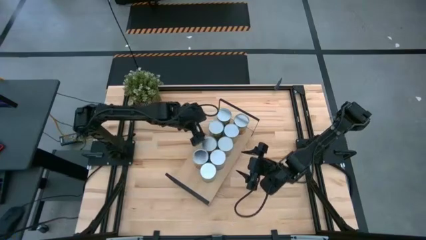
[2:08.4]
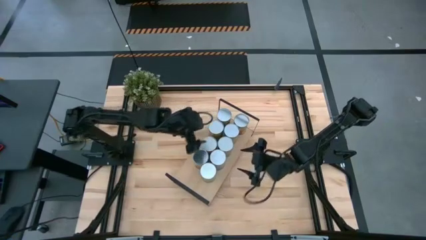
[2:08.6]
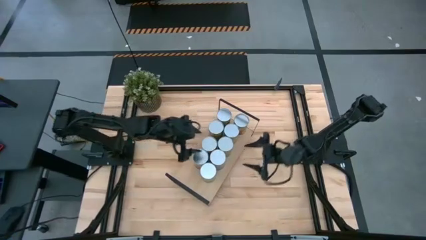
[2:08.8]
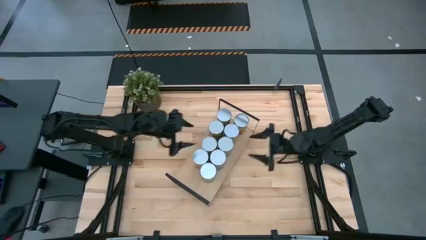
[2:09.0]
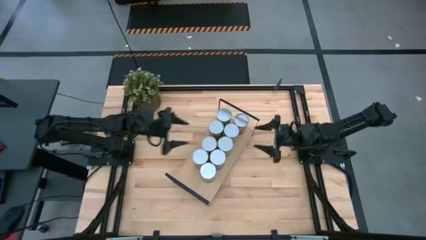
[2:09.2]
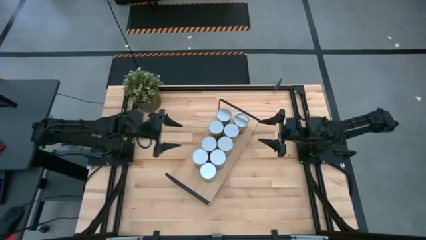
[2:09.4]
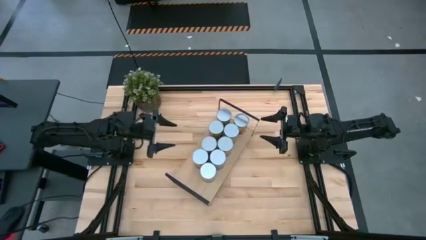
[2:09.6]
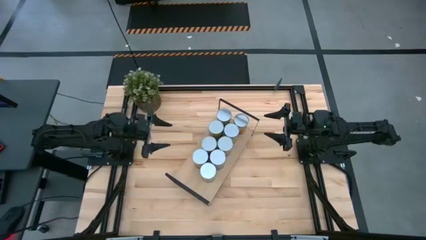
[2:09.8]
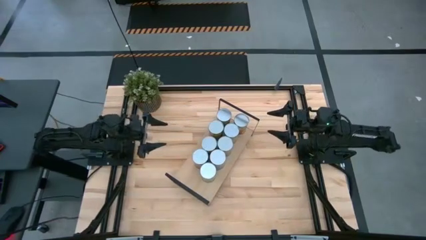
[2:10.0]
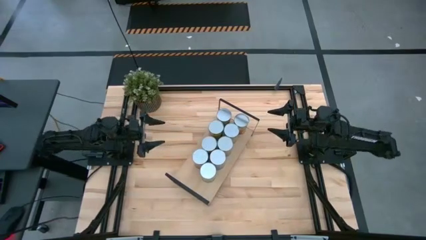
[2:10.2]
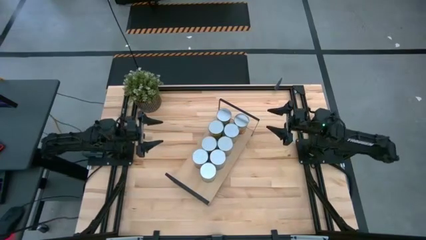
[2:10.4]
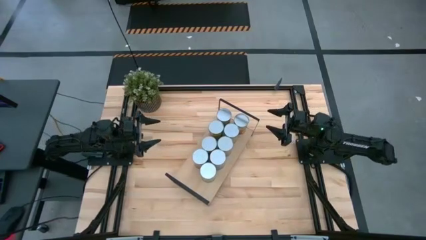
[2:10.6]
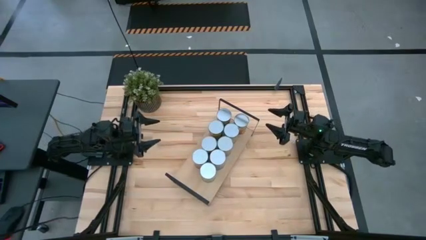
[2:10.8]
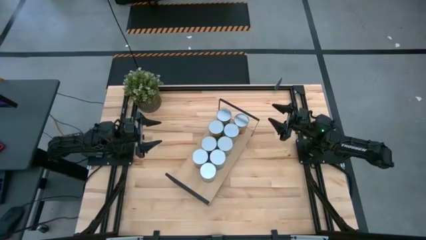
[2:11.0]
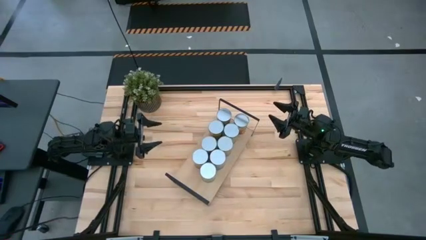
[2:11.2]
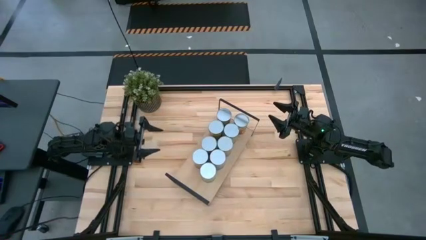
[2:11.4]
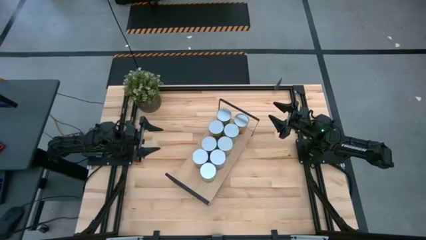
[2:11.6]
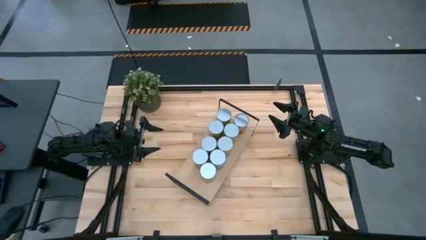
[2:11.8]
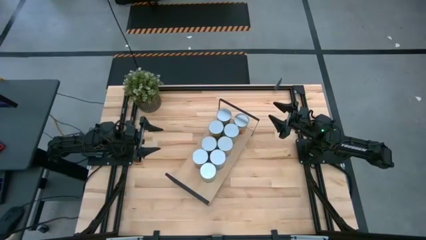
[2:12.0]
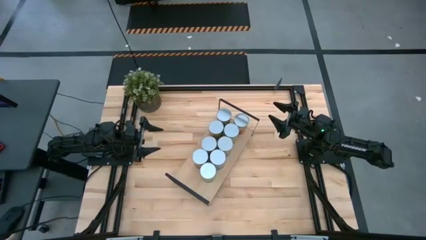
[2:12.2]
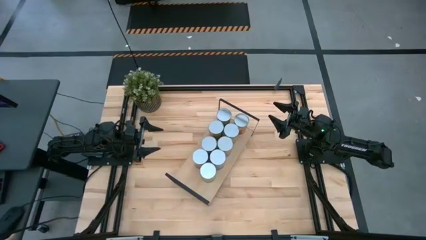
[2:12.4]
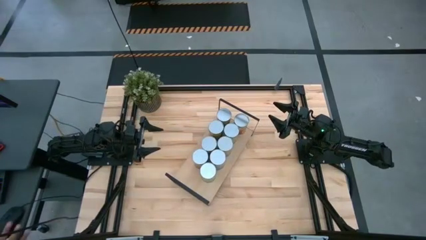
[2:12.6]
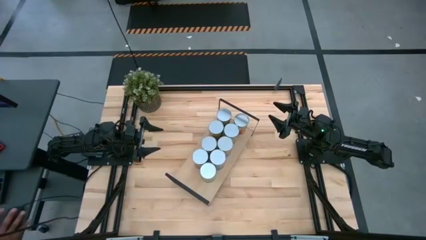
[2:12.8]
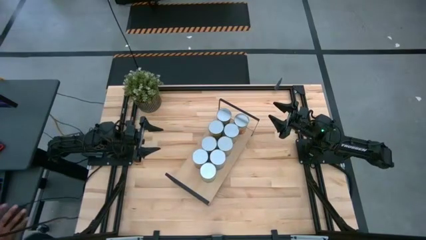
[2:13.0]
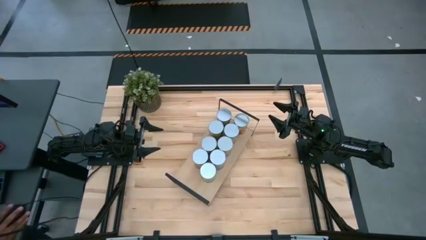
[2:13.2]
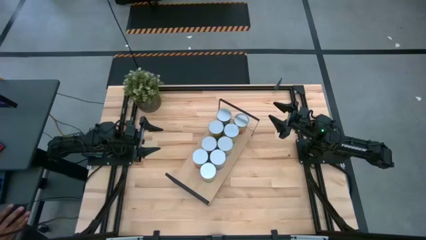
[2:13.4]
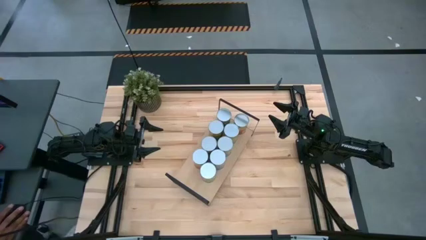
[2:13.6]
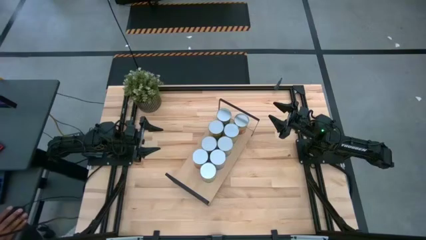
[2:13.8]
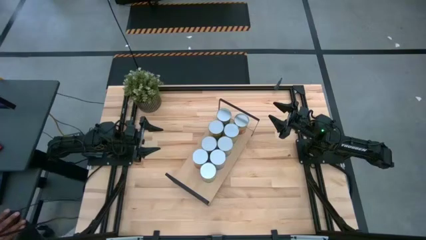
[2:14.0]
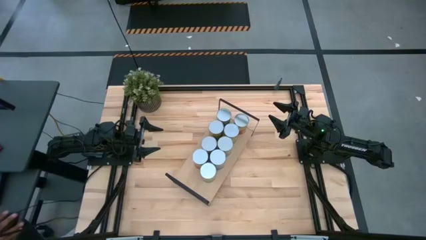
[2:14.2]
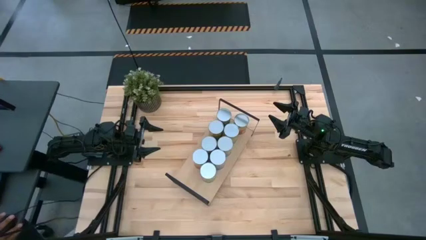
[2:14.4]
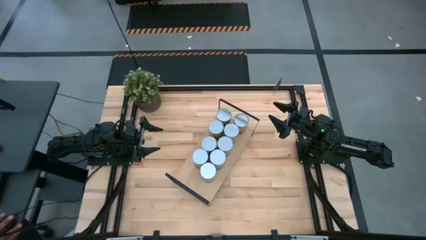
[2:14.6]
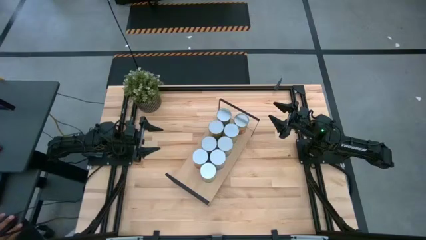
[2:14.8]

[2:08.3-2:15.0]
Task: Pick and place cans onto a shelf
Return to Home Position

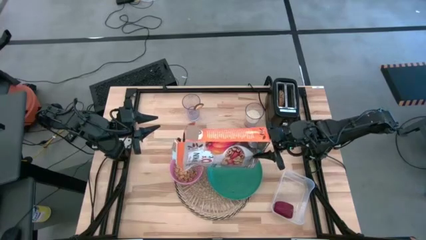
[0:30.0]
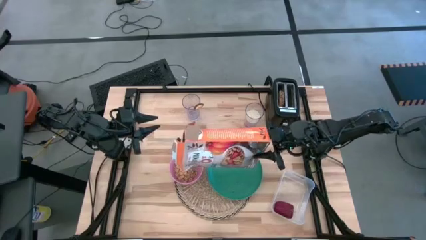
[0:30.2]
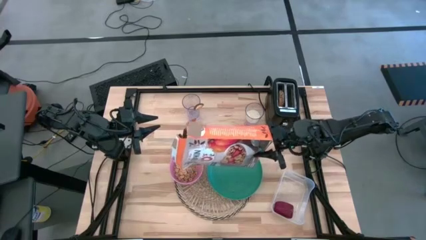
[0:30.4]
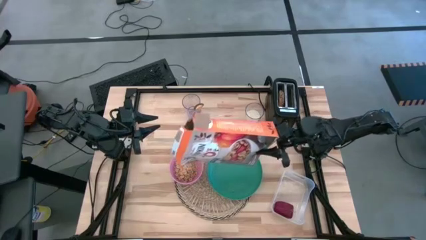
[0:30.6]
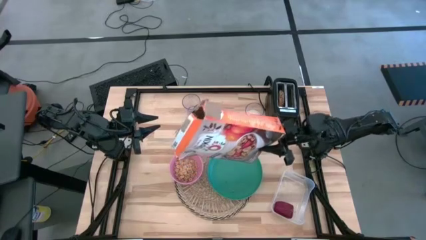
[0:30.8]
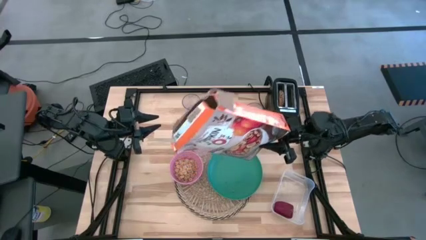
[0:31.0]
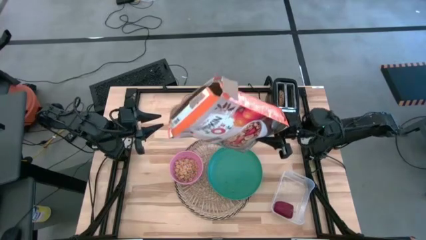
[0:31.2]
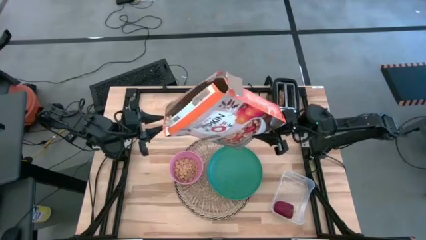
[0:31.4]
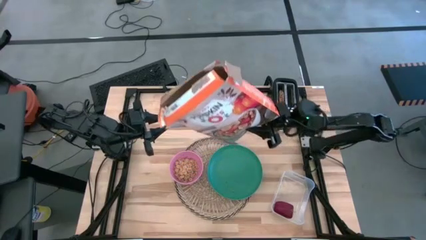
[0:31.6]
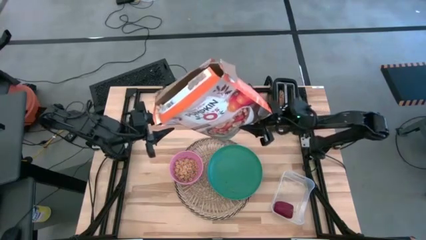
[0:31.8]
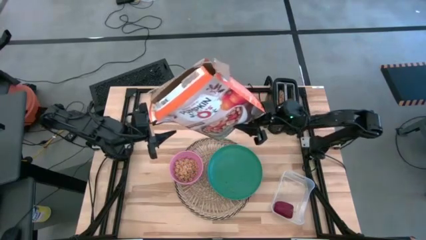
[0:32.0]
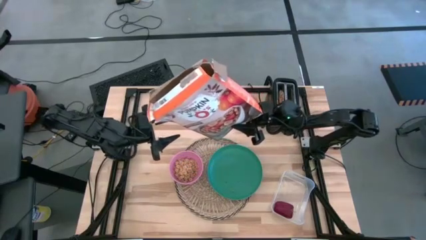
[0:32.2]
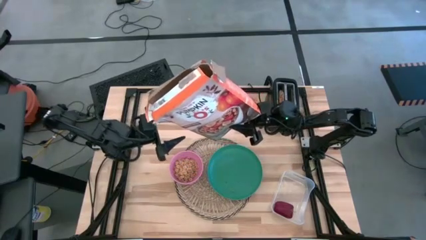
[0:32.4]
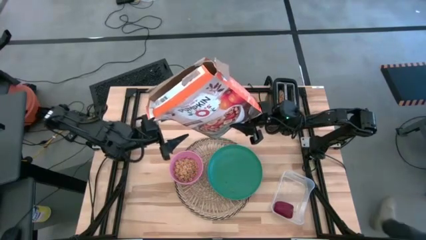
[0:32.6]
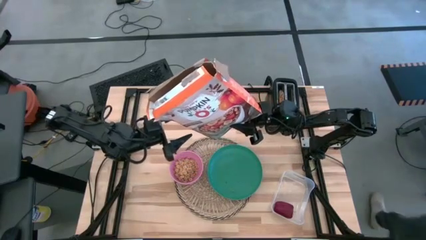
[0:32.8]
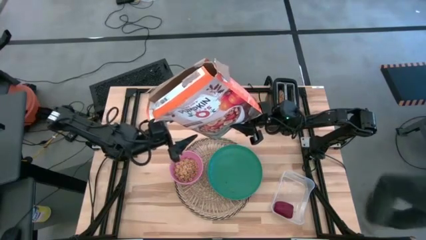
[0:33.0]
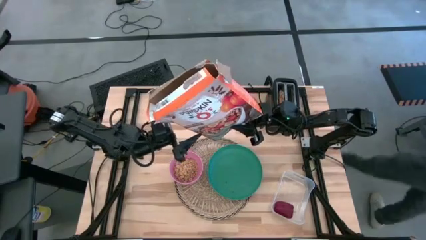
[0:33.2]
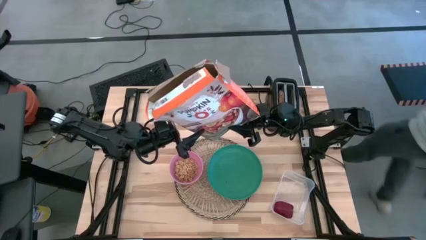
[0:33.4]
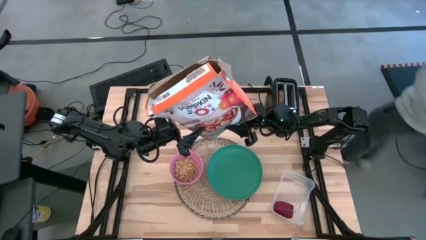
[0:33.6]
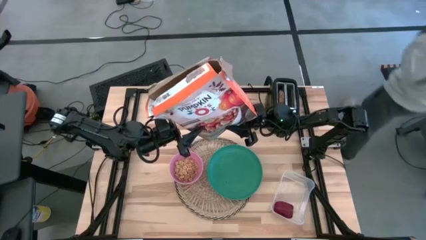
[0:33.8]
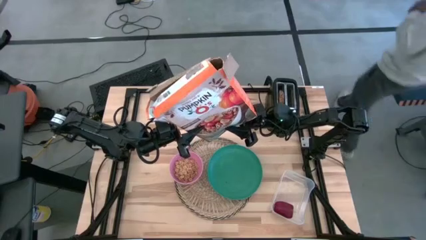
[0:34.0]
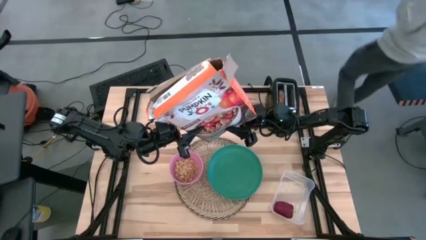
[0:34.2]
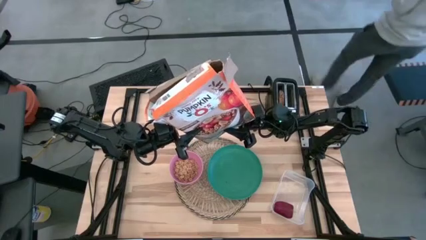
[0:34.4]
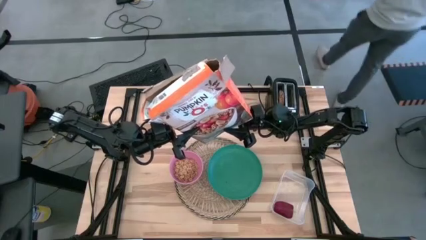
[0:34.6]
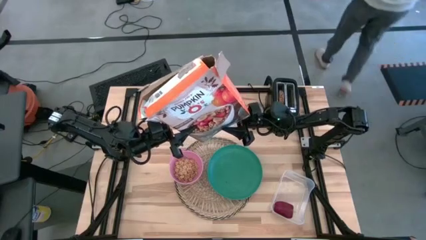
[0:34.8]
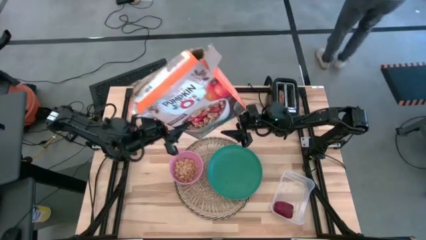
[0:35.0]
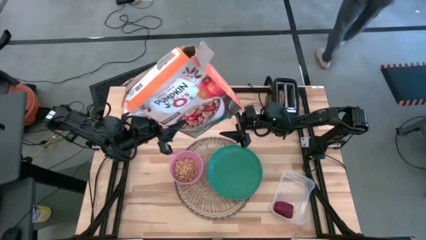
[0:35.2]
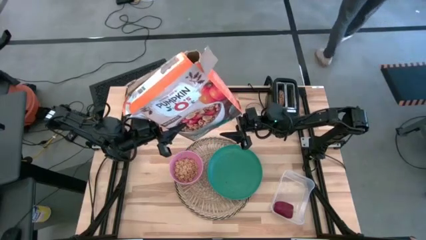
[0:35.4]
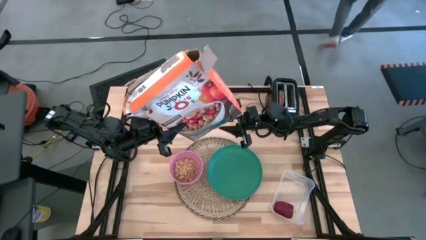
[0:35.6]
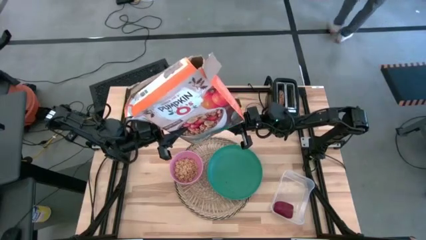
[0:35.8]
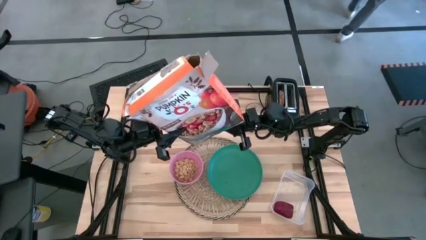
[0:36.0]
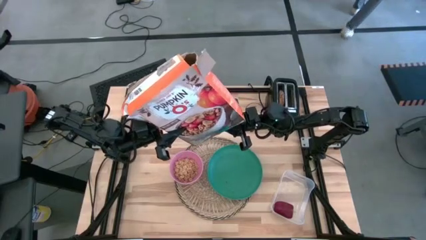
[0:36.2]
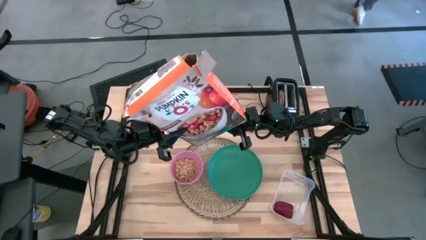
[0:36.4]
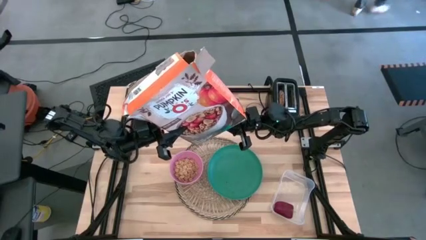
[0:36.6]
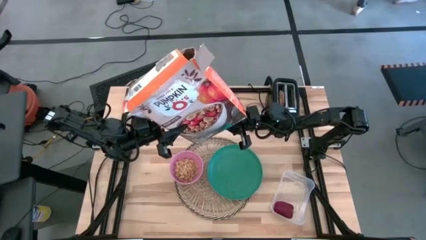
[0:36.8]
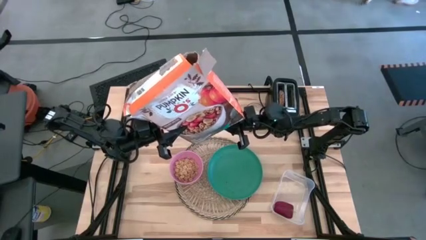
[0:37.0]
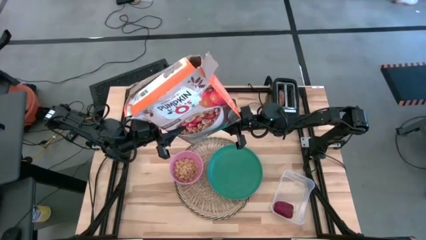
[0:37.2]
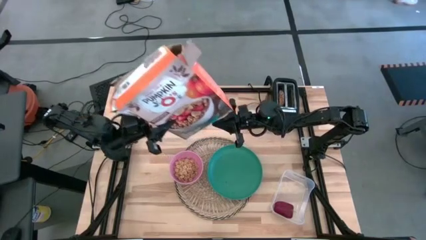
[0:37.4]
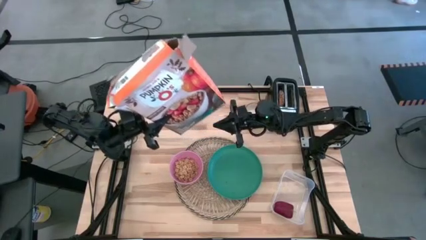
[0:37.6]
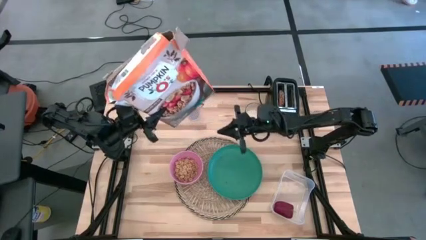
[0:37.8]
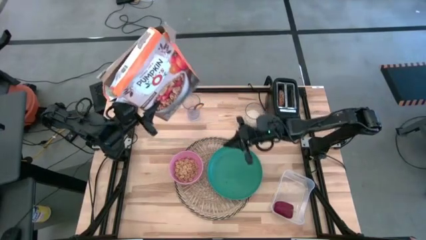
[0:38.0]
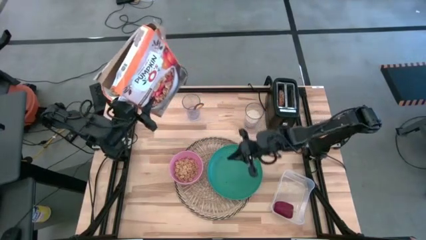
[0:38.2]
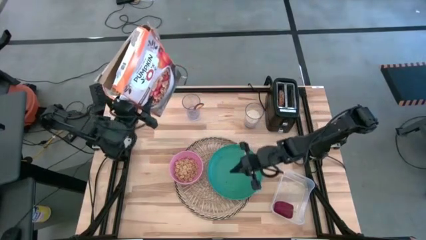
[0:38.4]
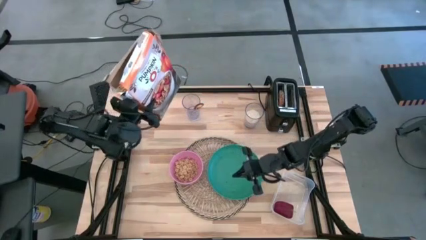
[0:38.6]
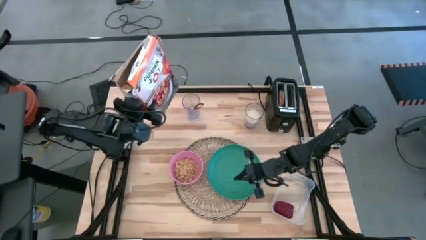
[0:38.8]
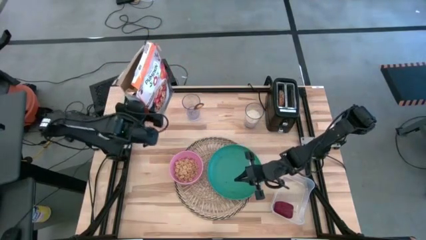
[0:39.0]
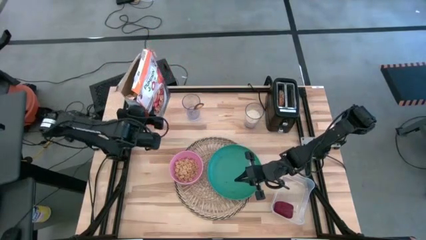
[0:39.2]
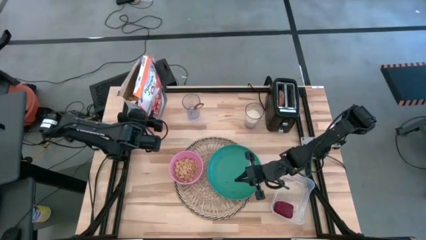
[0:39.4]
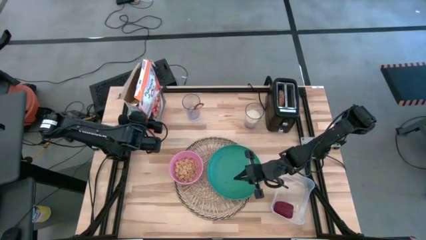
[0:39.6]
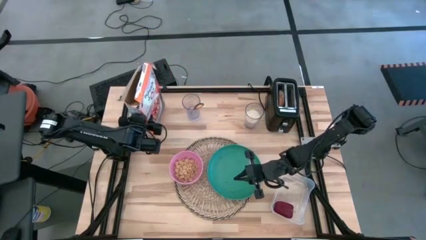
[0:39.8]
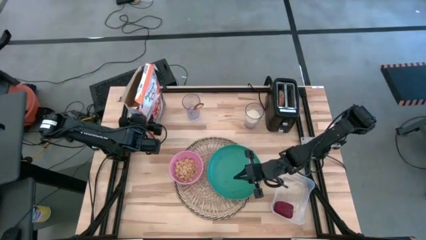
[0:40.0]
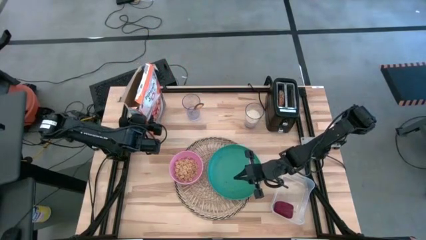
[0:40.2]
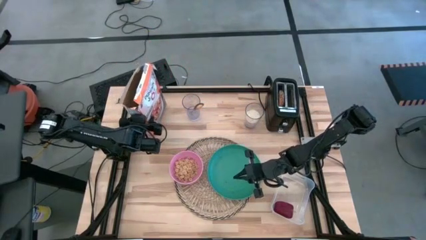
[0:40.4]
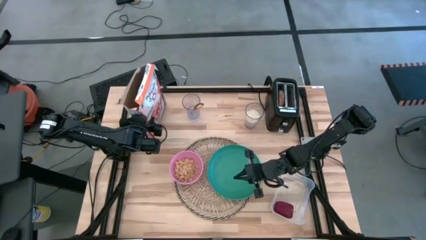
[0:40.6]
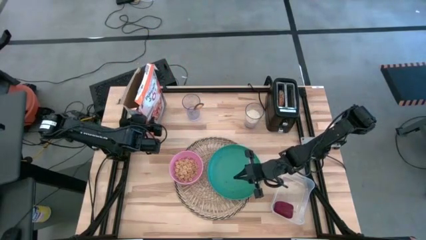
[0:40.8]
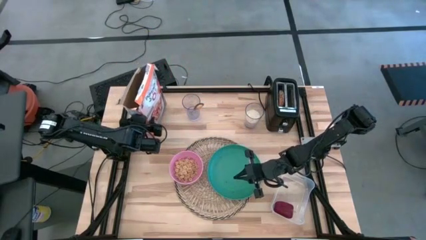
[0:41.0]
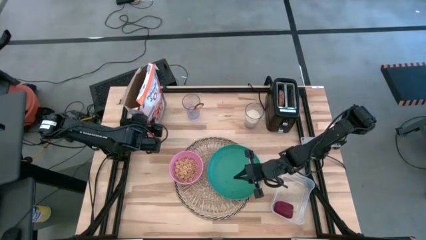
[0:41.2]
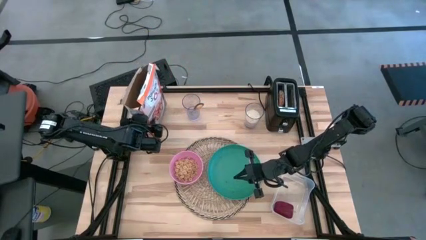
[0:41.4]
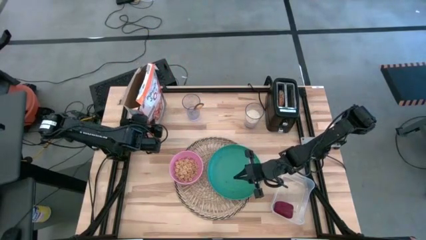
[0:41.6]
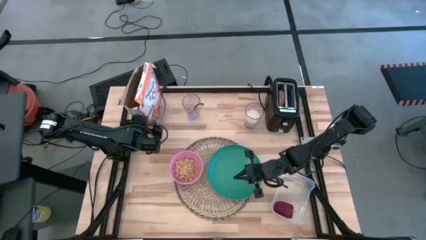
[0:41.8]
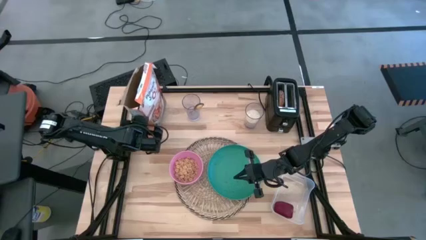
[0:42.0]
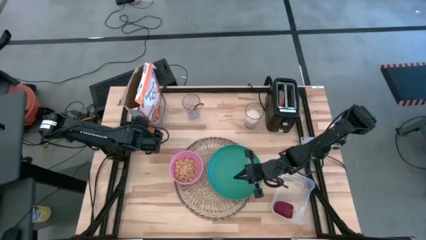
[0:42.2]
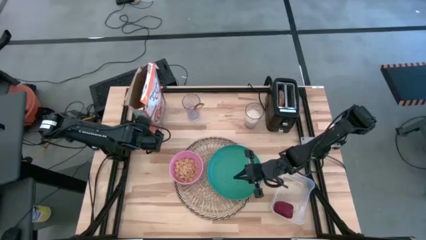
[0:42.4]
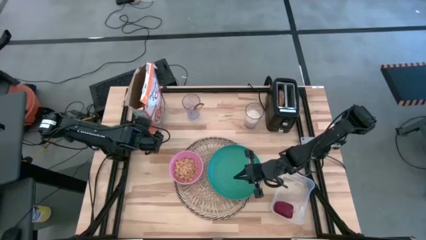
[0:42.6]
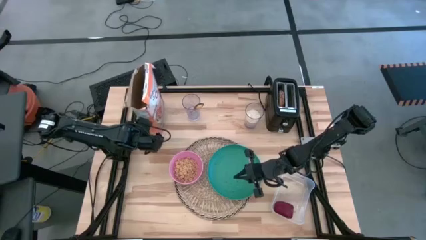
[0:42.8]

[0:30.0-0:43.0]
Task: Arrange a breakfast setting
Pour the cereal into the pink bowl from the cereal box
